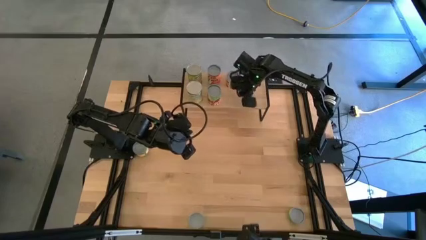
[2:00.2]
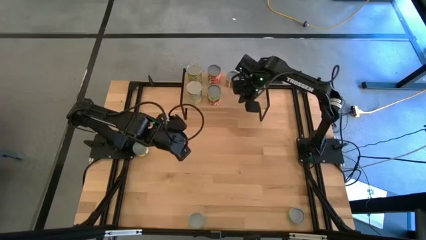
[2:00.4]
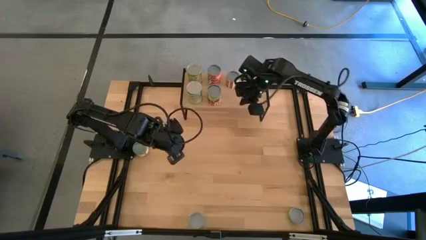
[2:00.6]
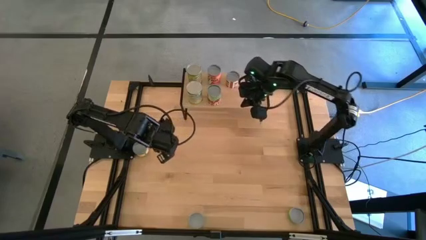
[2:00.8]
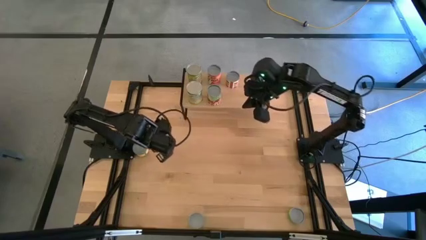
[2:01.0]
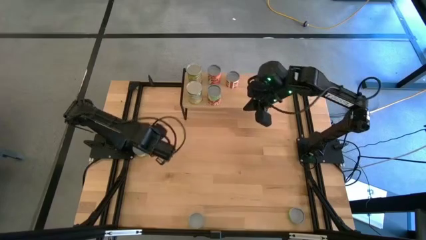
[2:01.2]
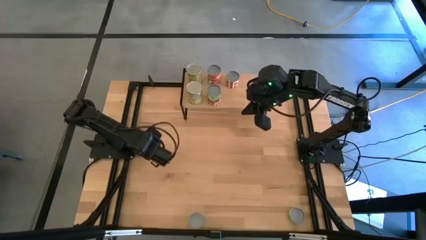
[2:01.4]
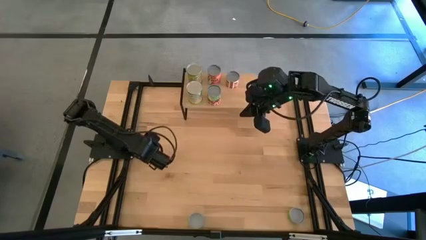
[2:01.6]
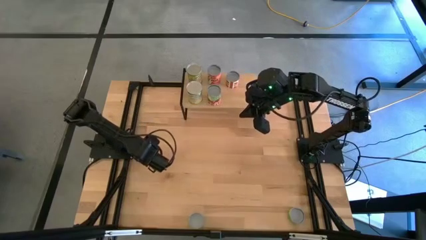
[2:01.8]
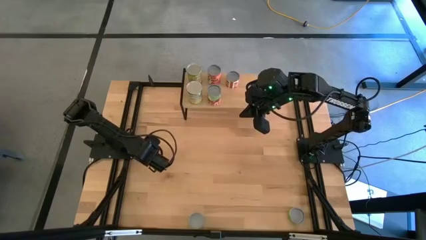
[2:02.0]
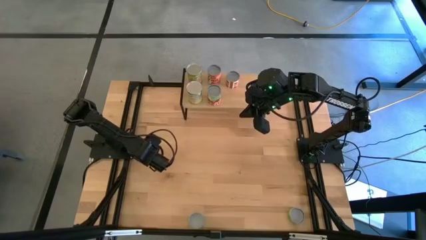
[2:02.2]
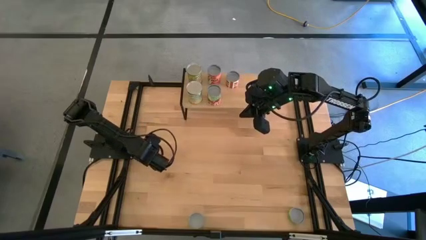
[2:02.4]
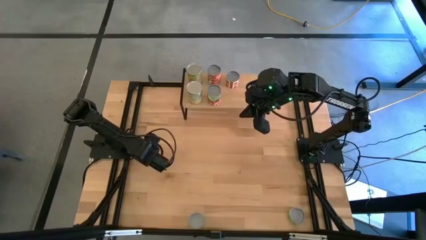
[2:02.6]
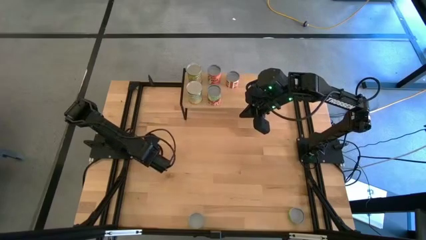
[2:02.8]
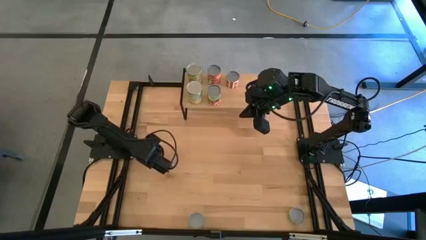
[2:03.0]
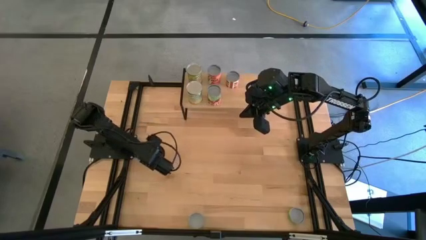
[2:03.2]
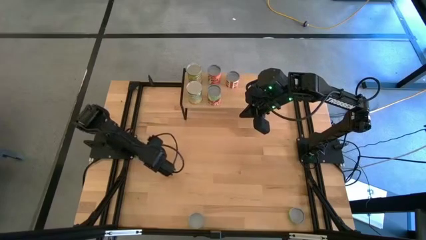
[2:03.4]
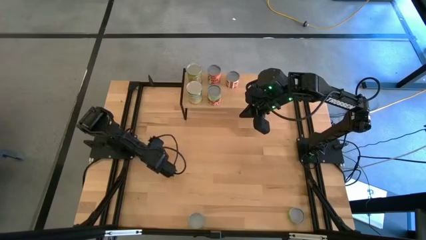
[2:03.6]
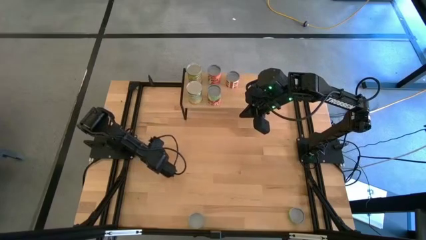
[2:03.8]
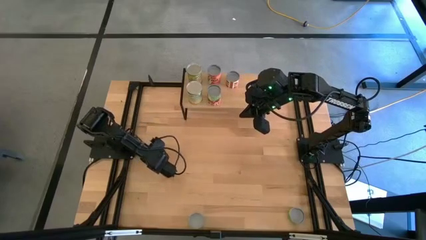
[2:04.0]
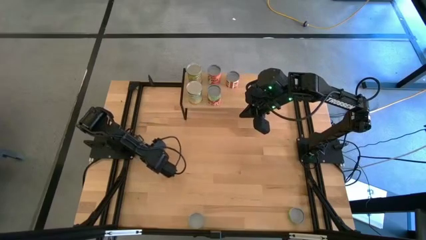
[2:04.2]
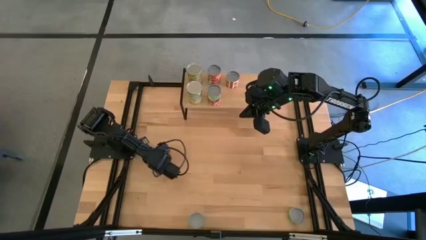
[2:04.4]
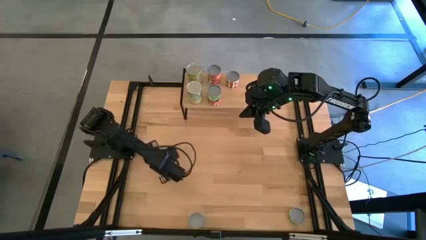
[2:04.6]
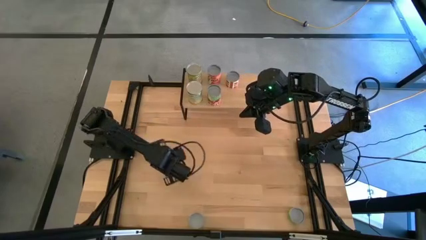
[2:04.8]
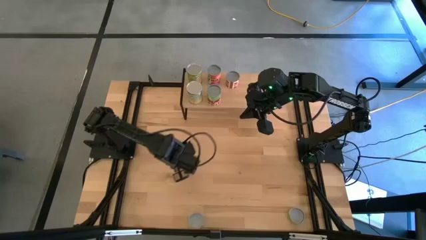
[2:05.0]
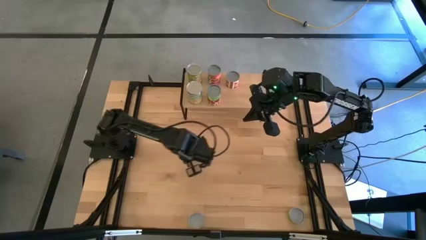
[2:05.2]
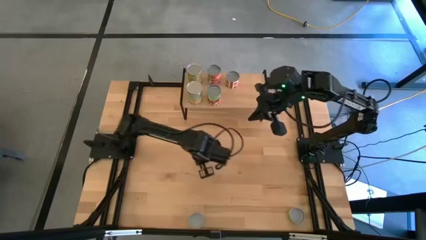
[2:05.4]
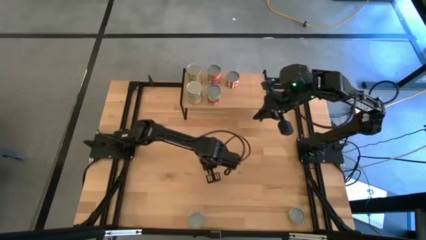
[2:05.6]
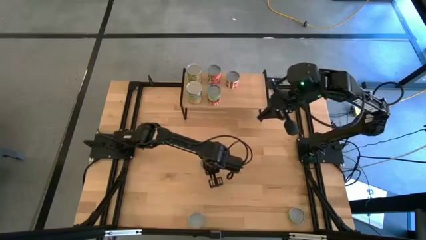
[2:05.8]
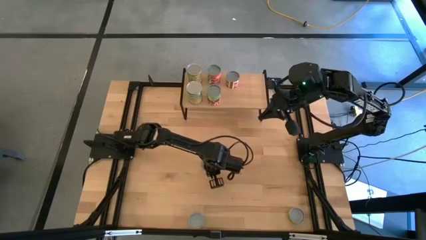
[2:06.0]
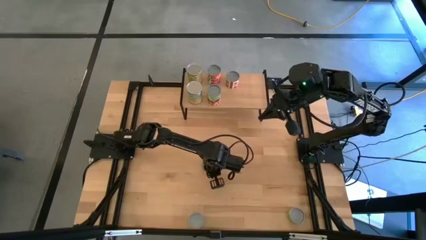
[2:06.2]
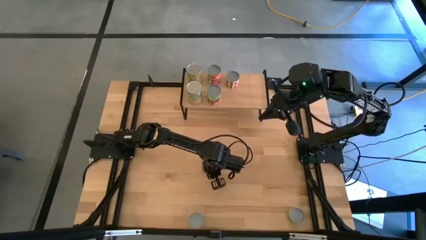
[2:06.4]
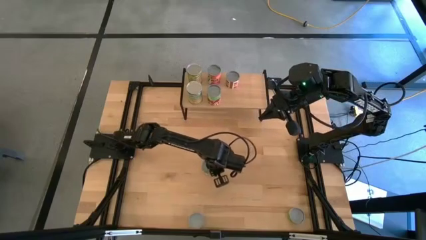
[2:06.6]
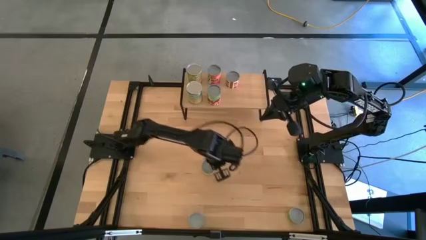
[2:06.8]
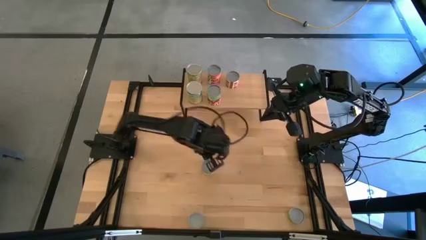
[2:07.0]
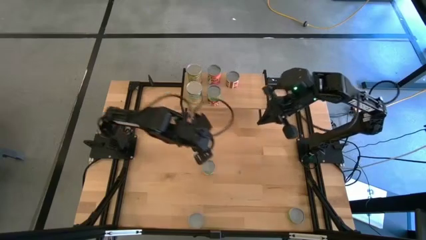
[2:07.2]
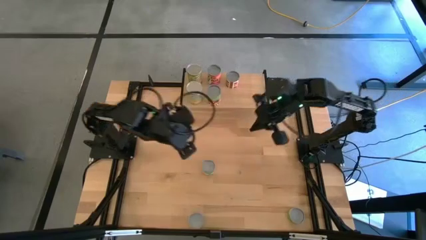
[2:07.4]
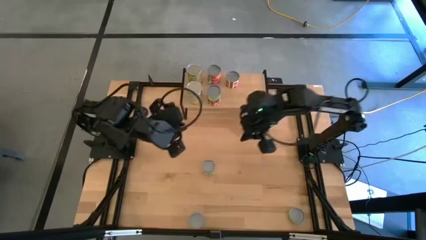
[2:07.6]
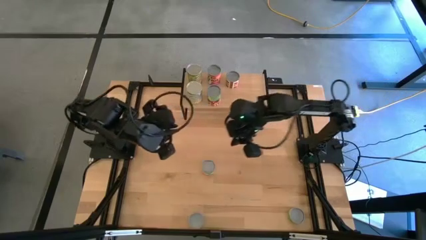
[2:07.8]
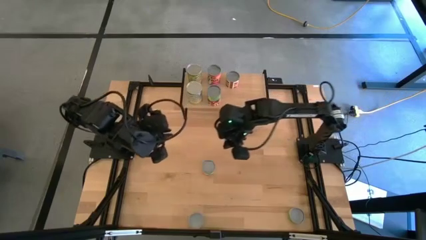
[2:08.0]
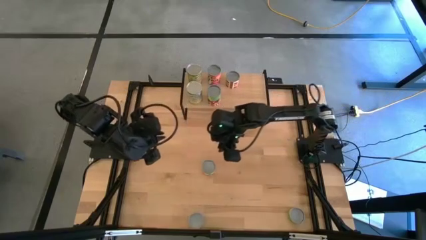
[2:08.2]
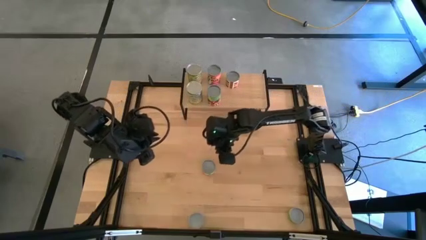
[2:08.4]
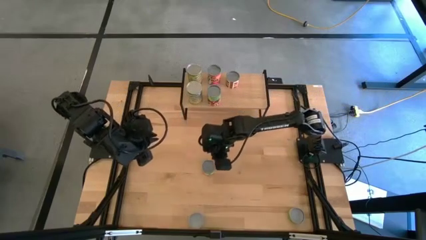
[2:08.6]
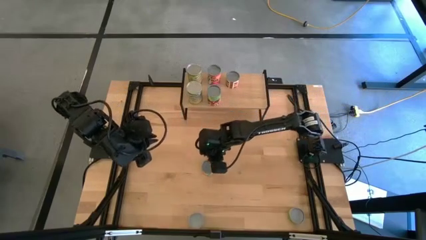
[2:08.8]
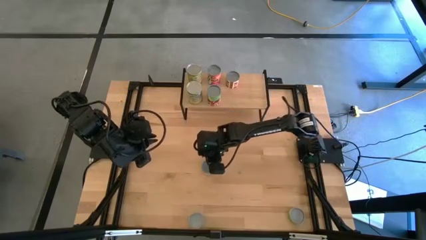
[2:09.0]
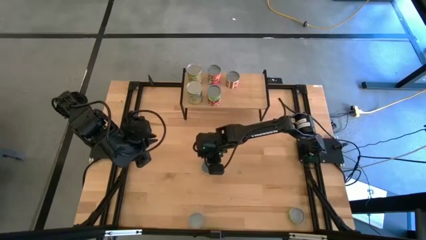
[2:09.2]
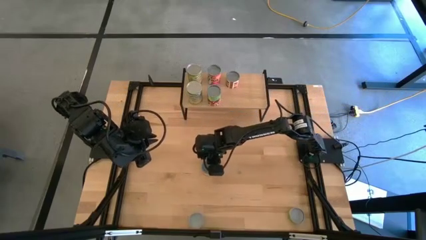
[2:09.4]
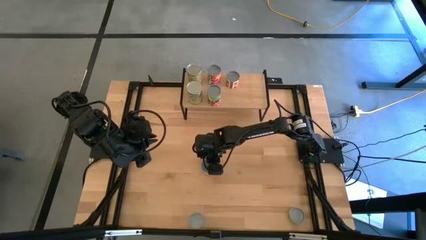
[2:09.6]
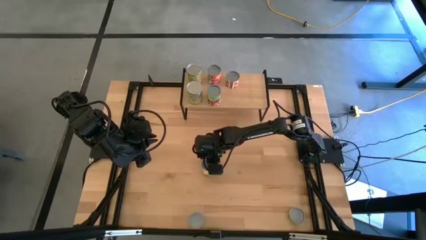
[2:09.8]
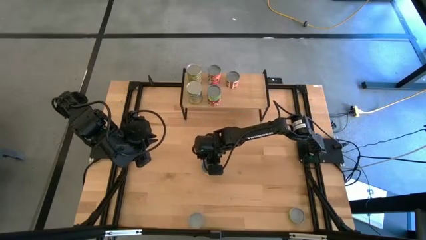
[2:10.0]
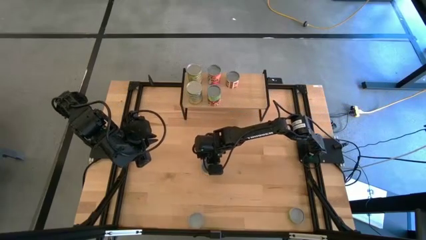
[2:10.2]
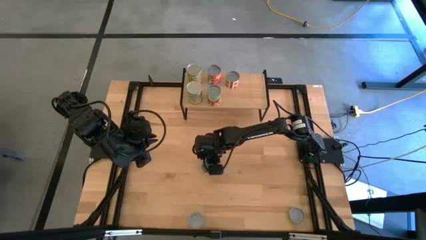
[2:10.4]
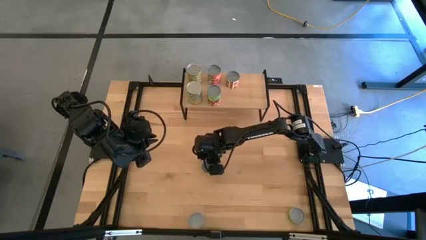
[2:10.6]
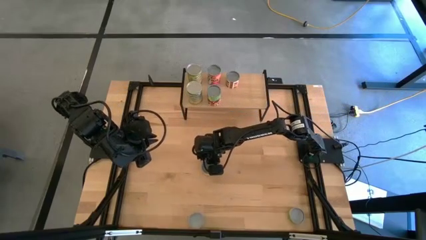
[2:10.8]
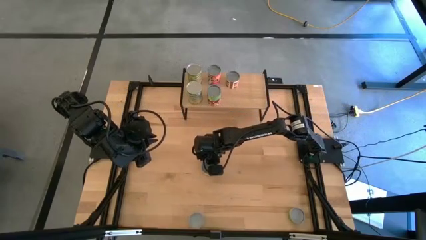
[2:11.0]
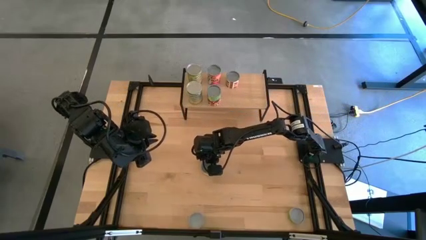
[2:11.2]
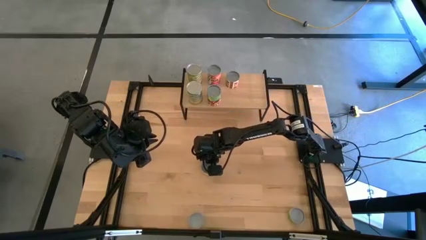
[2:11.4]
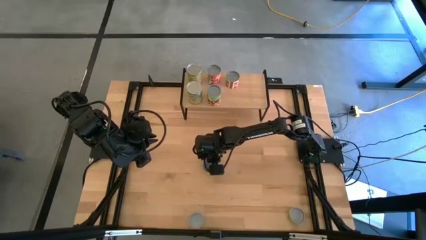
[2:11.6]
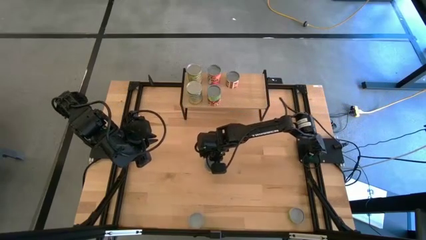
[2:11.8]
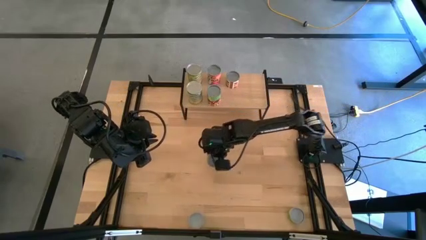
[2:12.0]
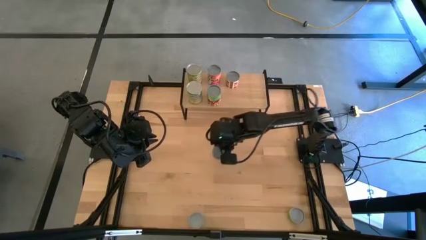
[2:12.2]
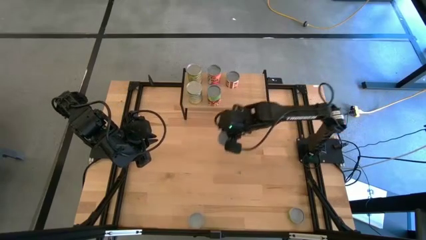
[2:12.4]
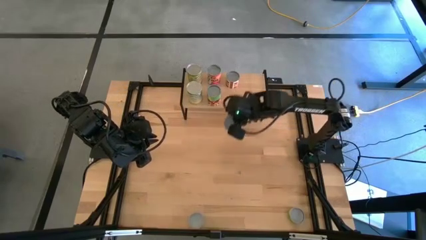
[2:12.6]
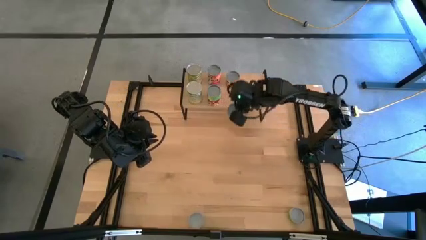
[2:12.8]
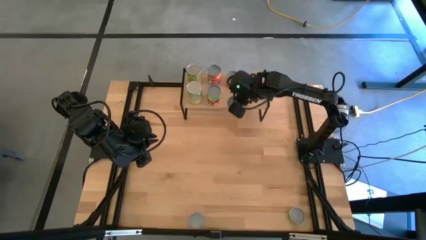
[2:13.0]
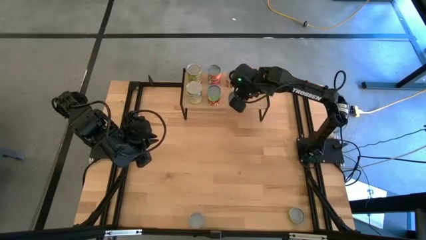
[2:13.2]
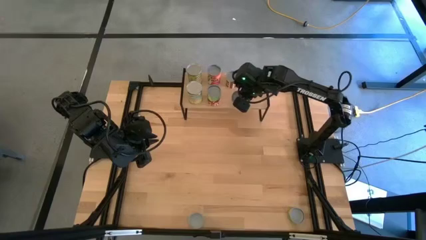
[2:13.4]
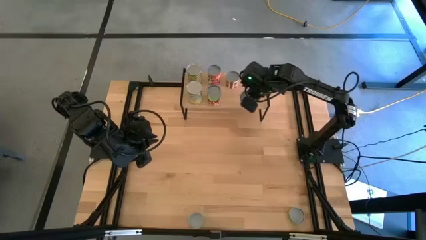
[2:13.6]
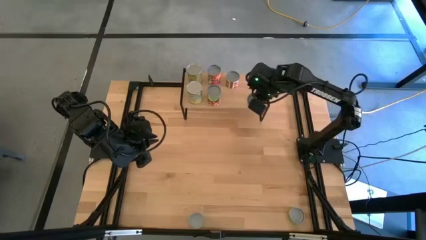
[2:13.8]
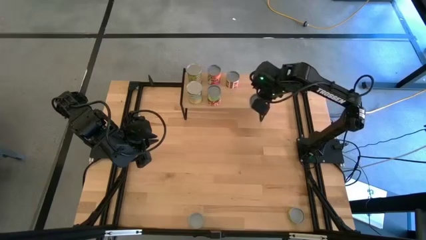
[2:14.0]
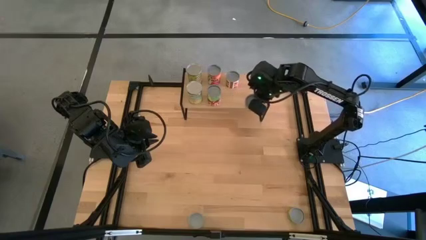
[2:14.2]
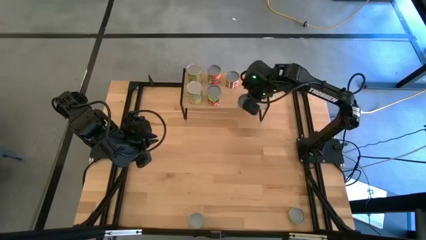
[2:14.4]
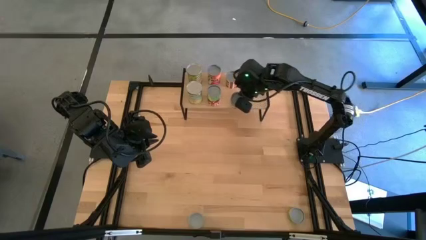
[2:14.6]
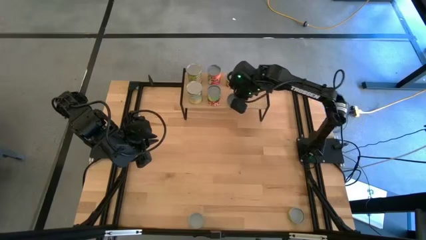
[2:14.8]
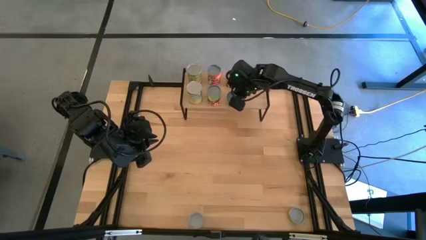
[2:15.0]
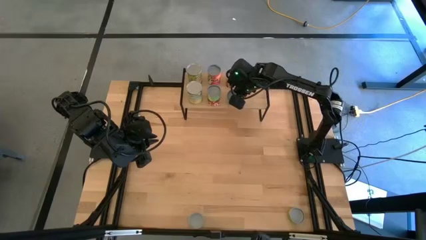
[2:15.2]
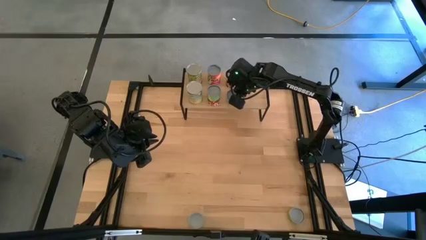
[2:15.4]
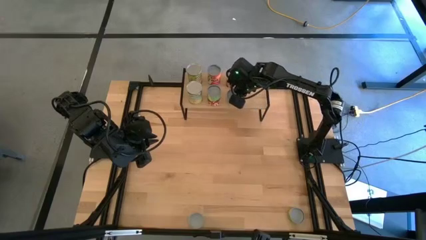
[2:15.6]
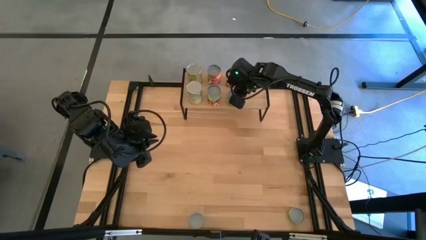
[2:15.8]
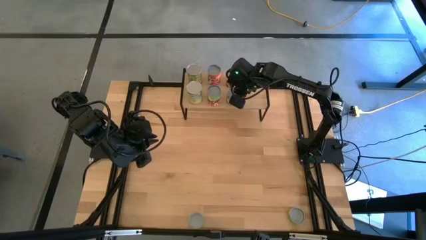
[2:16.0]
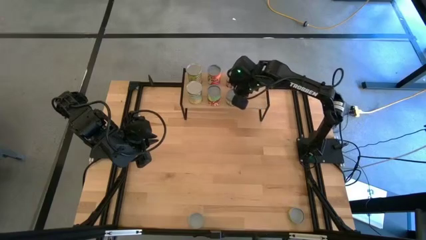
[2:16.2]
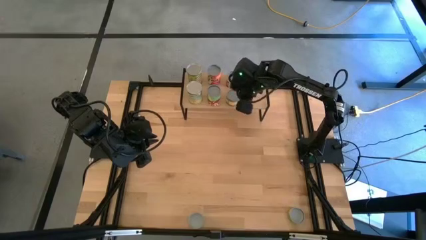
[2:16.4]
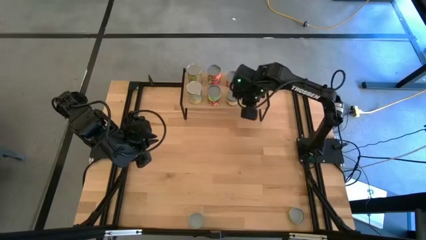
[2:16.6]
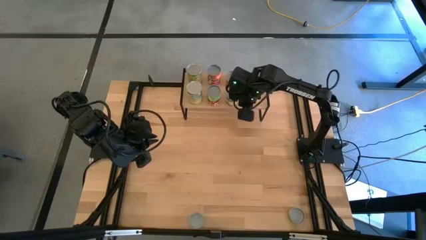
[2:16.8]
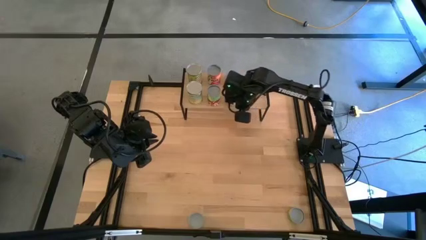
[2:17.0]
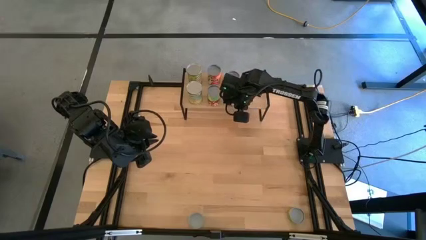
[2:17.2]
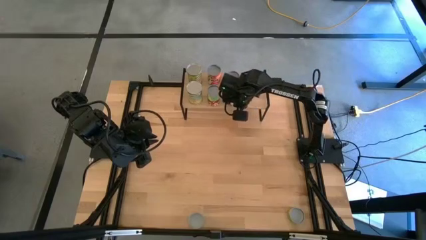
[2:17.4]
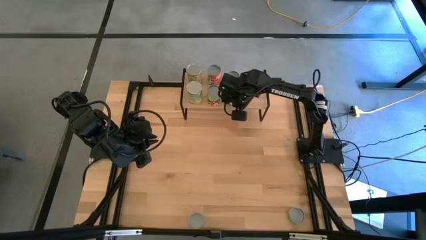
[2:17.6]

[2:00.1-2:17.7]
Task: Pick and place cans onto a shelf
Put the canned peaches on the shelf
